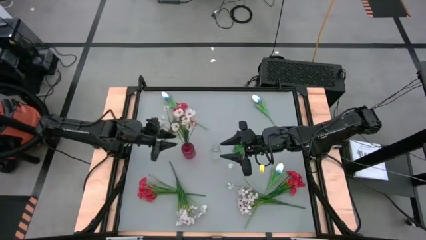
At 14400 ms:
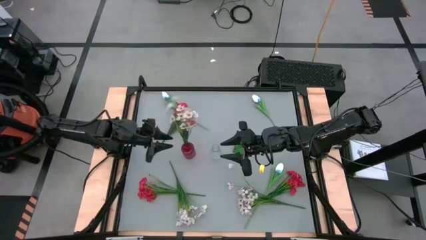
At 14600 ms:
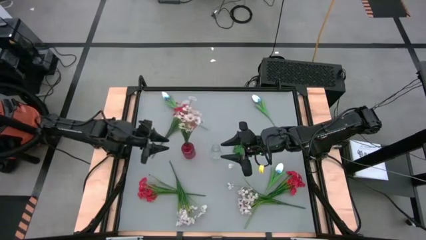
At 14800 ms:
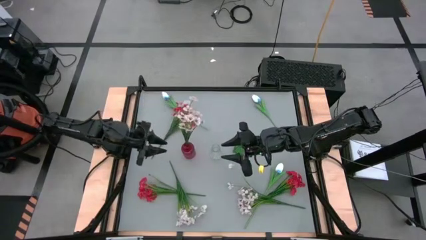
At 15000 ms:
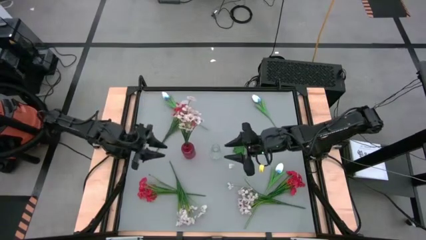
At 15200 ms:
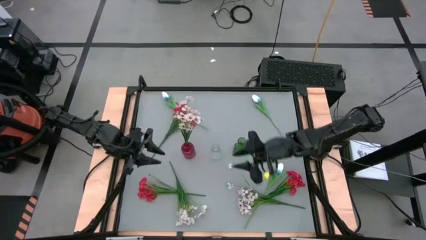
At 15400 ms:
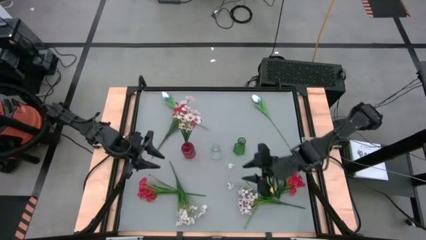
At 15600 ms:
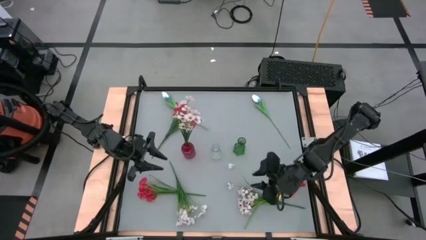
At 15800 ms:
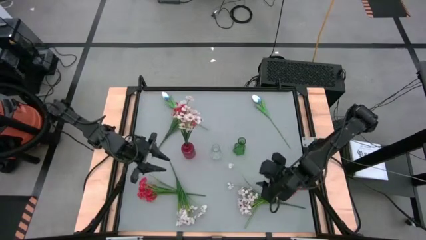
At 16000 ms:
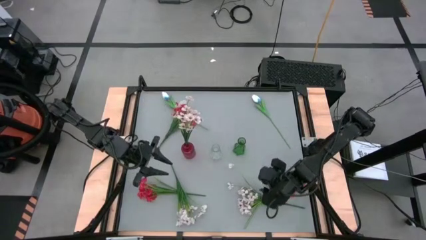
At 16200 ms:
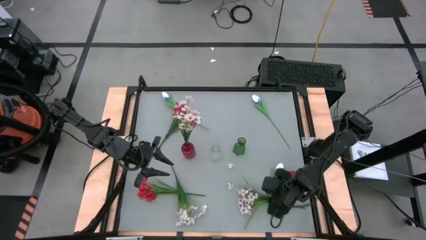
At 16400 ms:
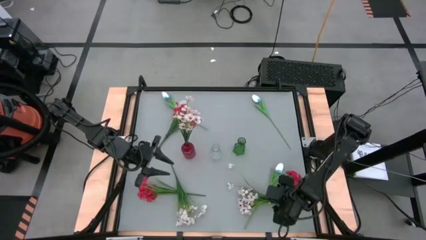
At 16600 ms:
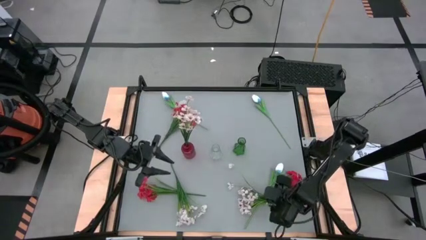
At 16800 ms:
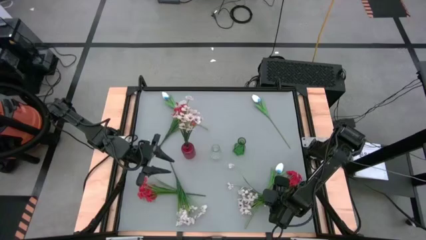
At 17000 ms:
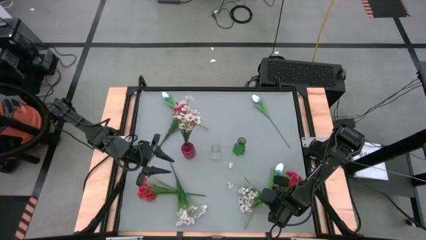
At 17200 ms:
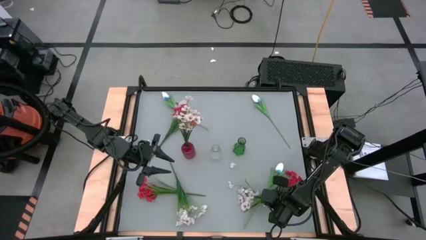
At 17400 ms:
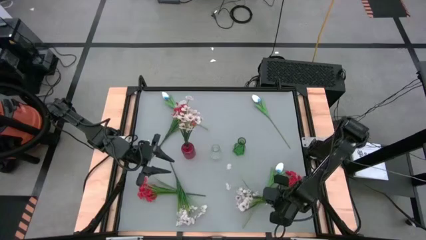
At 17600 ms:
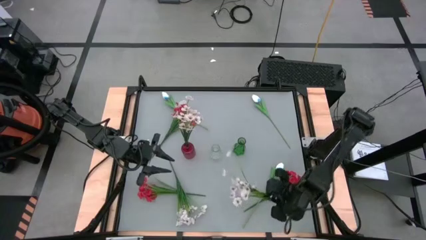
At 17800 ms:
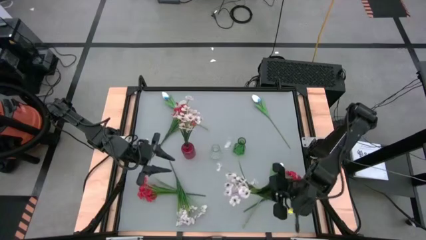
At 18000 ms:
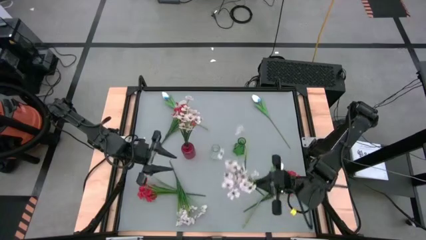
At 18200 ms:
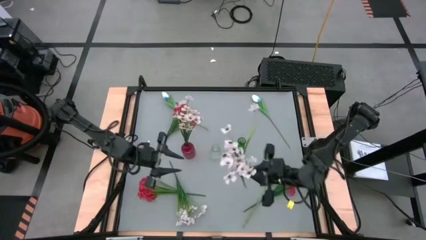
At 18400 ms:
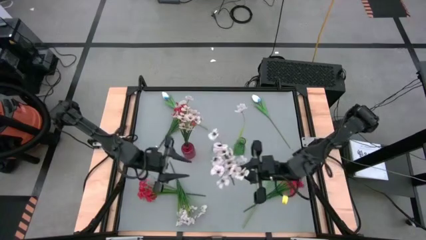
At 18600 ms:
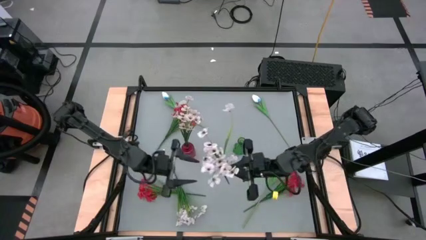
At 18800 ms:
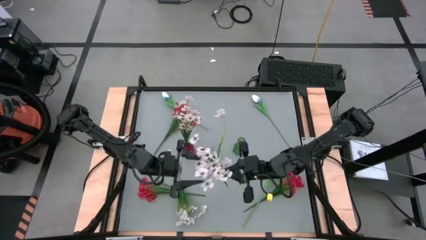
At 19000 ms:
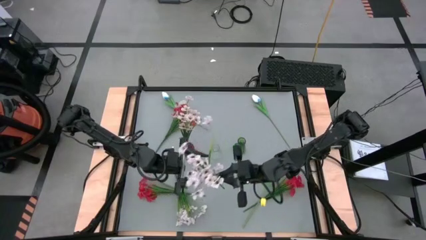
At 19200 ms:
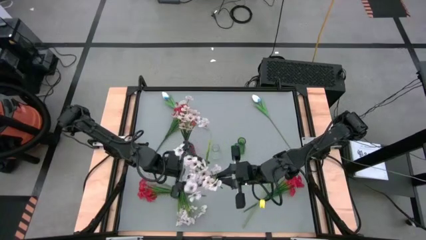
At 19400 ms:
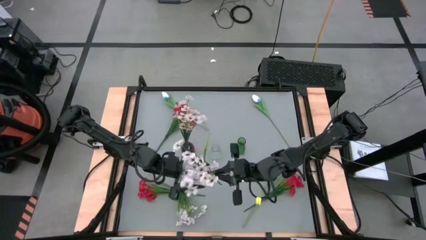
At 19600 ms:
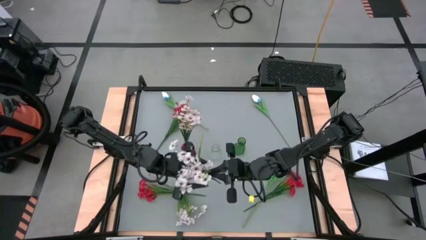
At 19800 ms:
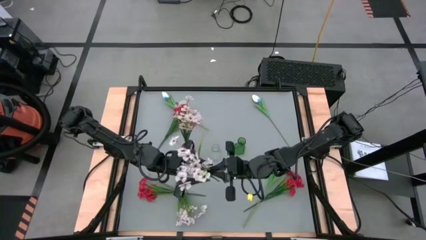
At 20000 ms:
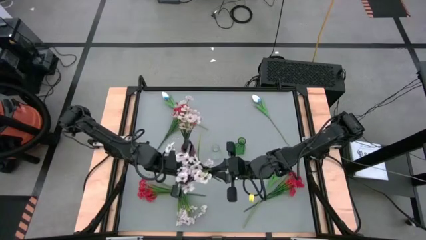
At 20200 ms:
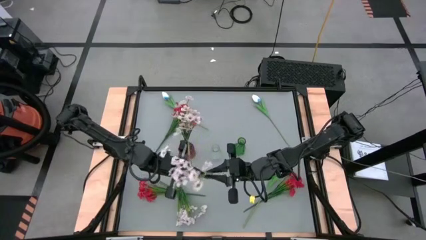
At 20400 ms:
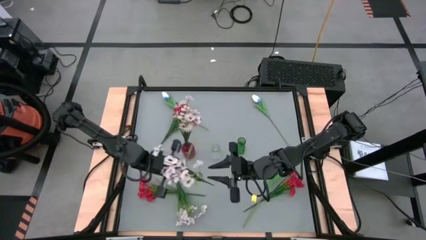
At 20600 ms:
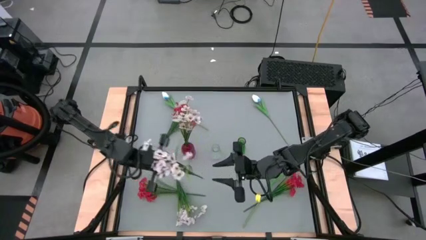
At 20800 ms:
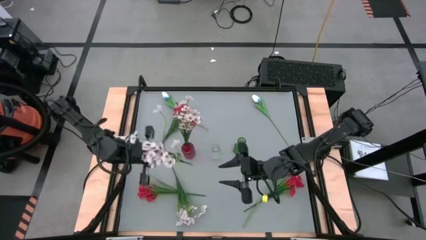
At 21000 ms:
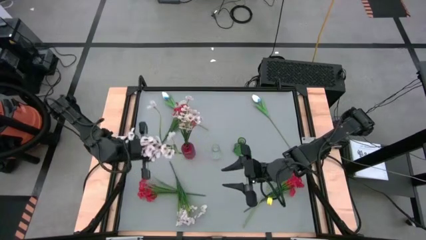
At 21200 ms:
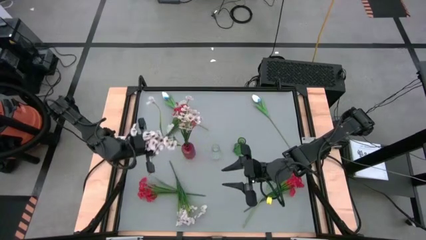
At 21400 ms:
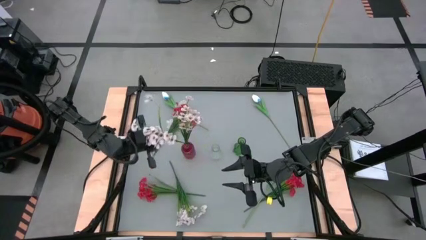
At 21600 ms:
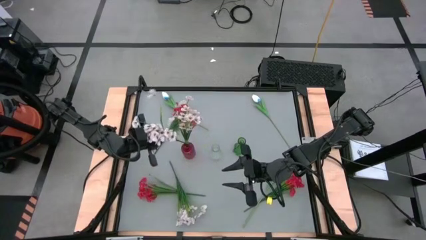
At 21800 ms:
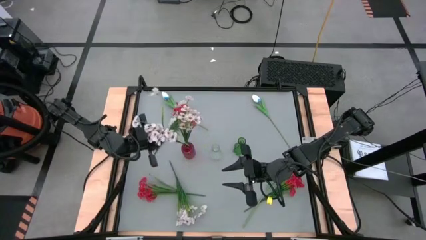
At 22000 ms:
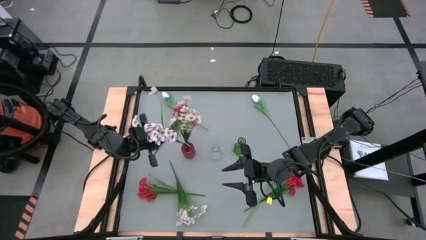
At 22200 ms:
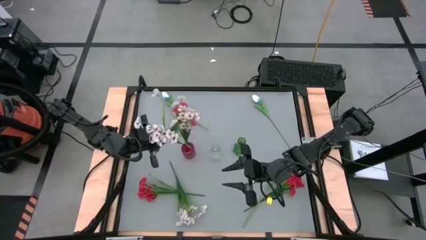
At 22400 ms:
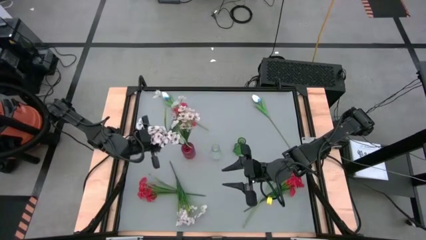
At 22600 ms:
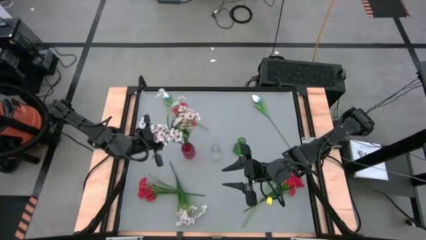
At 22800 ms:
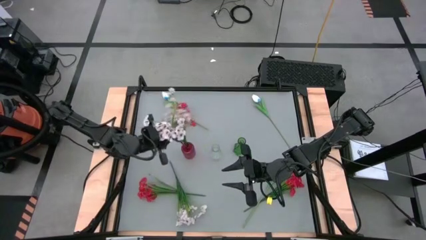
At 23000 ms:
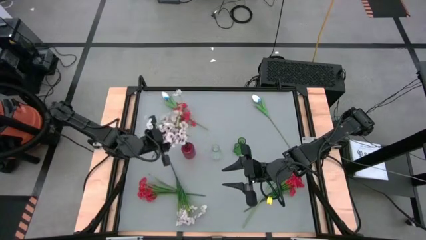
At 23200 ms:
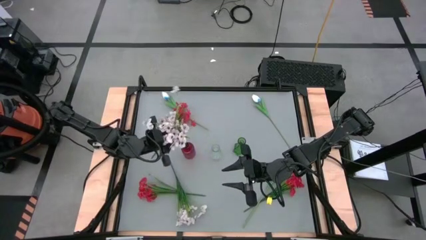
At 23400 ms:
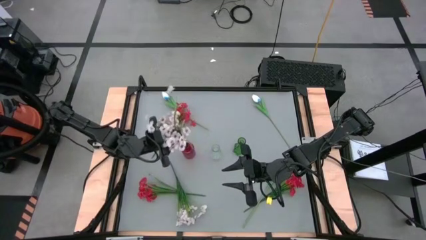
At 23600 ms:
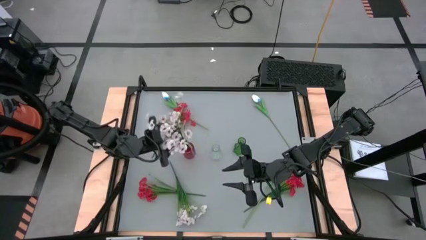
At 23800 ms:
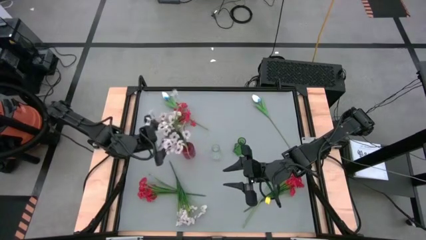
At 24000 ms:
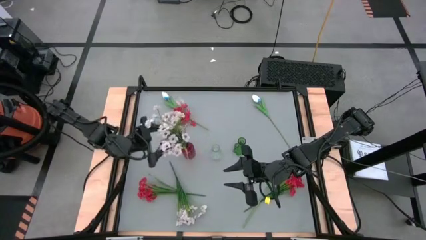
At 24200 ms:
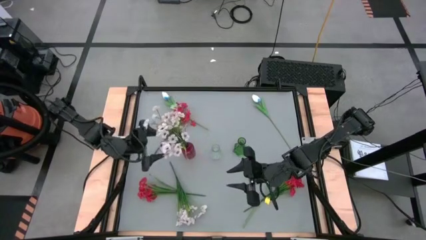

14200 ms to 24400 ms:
Task: Sort flowers into vase by color
Put the right white flower into the red flower vase
